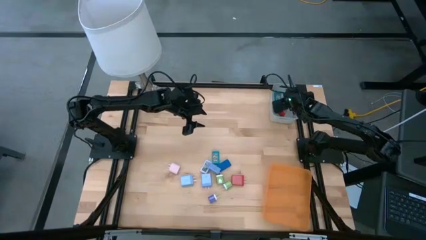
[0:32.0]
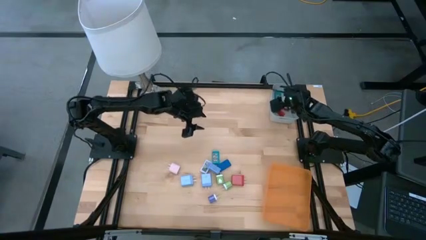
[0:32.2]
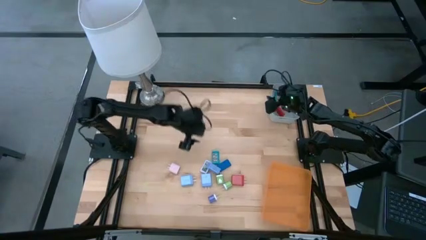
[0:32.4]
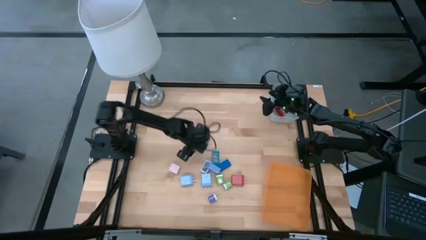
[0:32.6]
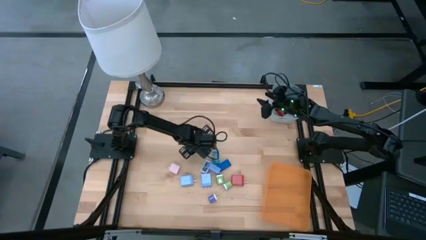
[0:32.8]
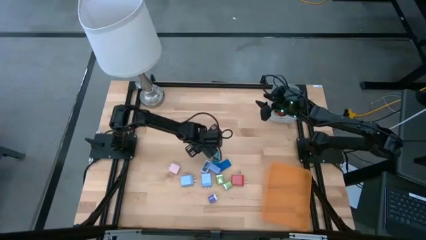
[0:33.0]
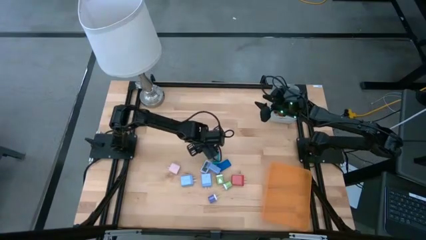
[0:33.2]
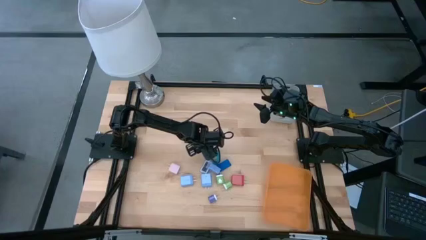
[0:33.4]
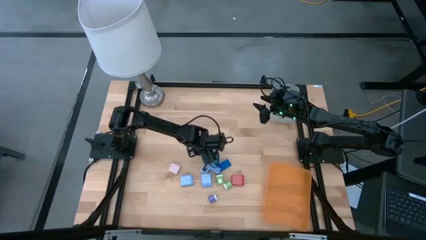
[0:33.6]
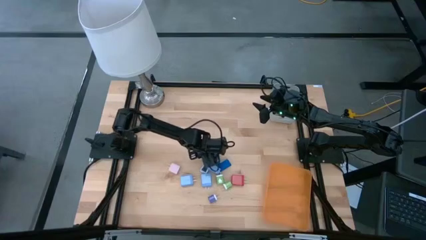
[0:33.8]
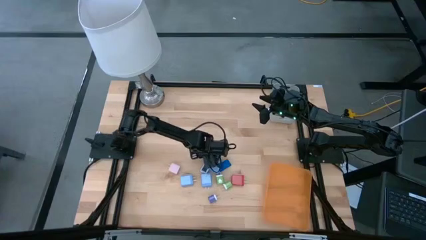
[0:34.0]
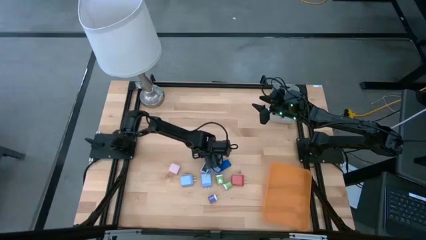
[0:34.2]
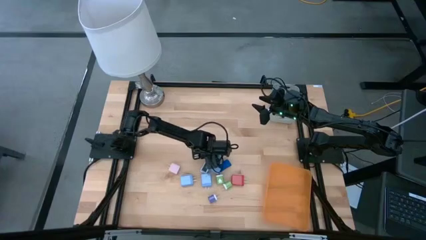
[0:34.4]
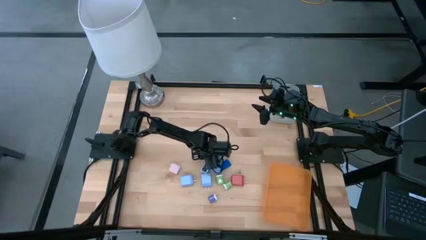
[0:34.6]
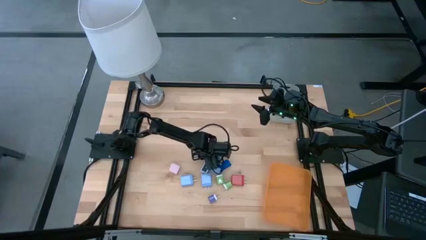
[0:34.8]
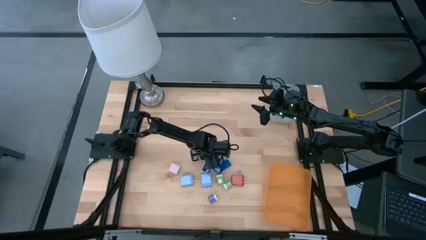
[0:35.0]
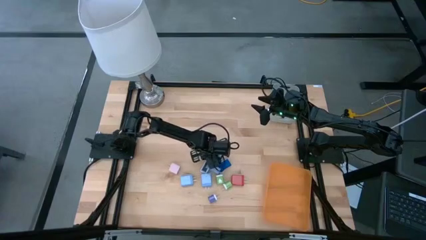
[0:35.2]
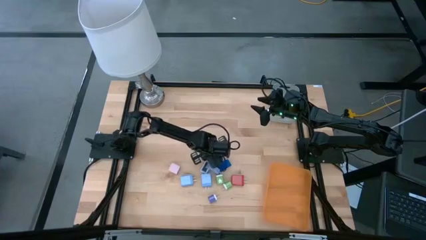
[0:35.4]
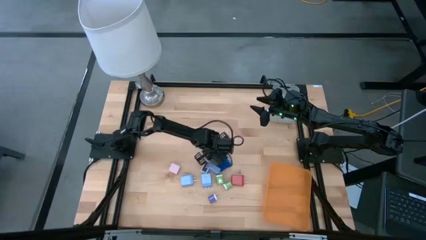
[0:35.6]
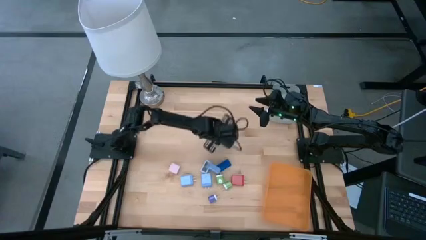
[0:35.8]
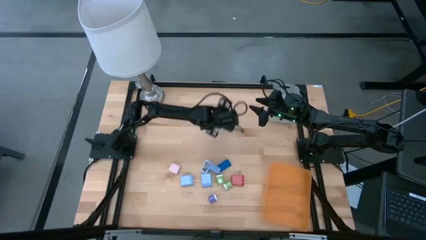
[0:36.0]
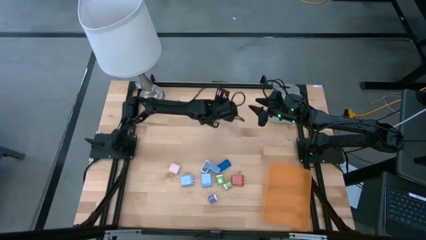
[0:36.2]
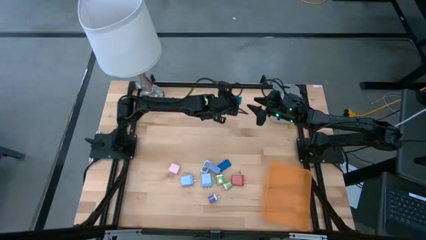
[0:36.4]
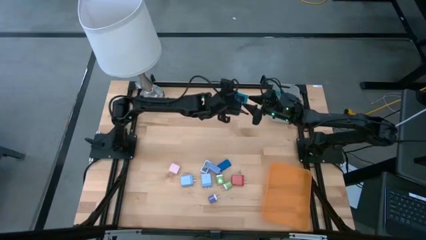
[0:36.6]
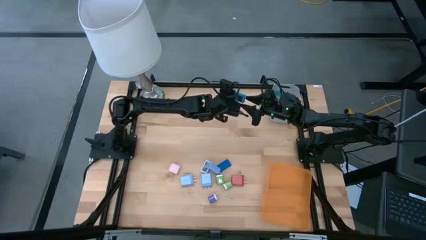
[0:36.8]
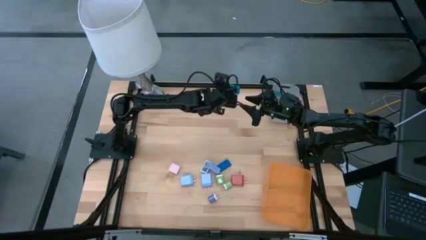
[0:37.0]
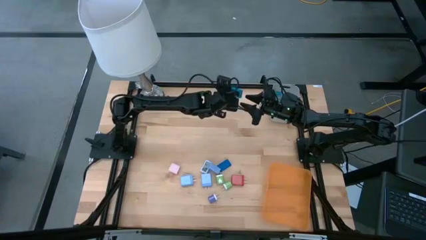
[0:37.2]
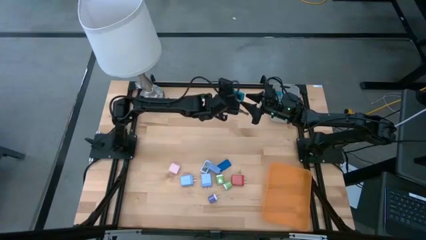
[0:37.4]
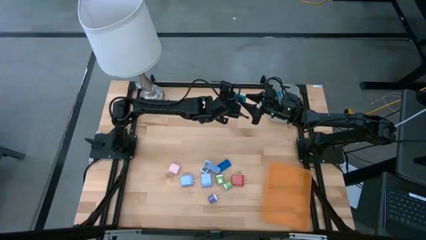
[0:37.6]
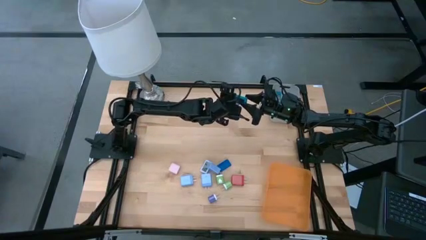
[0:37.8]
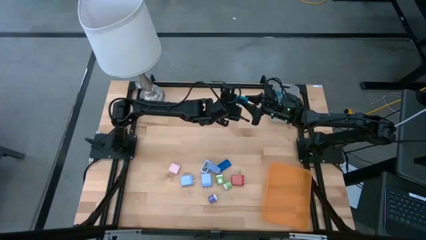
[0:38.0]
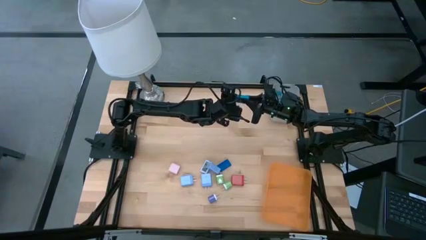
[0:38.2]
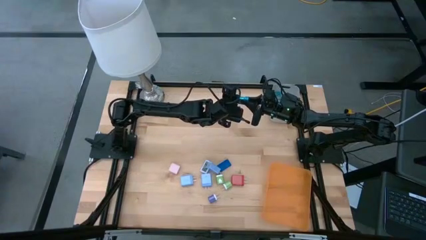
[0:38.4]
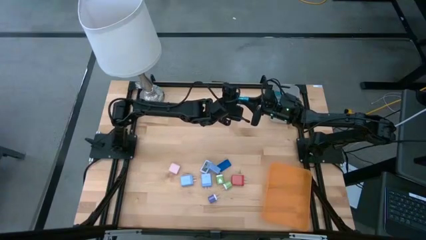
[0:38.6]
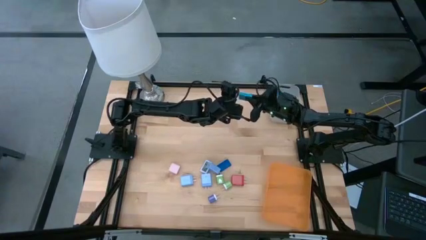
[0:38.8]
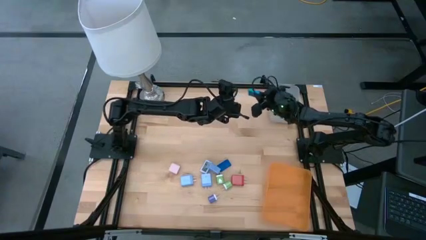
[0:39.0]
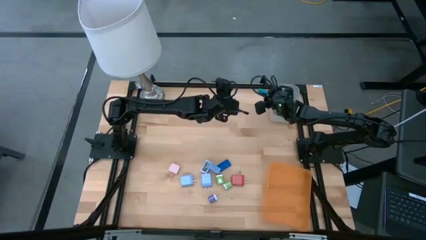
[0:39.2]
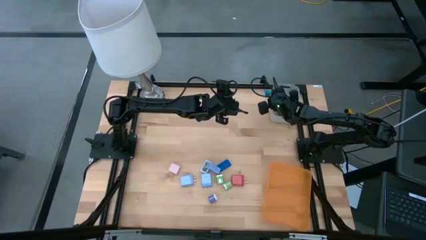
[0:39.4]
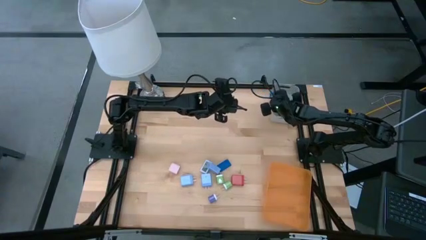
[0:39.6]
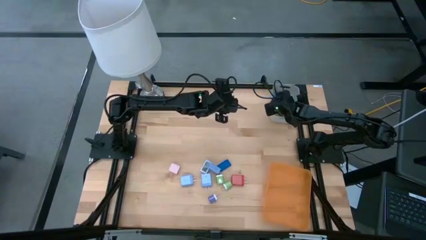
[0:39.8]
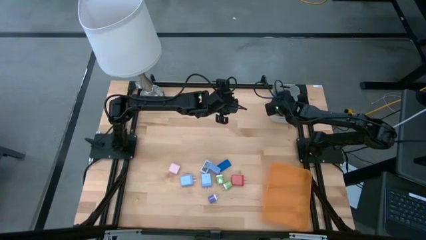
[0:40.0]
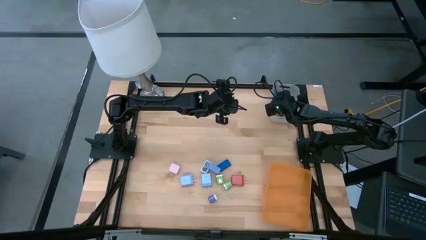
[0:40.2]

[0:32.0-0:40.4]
Task: Pick & Place Office items
Put the light blue digital clock into the gray bin

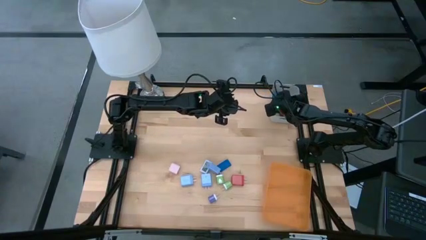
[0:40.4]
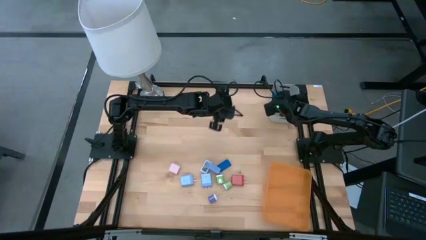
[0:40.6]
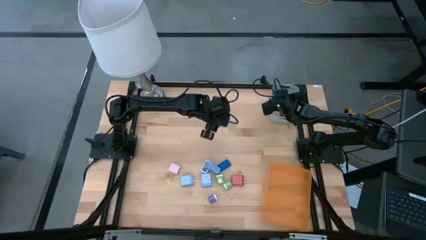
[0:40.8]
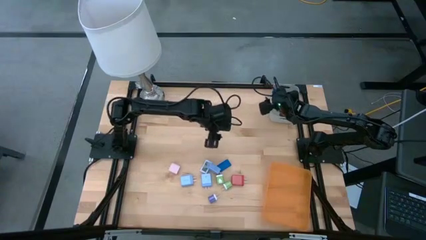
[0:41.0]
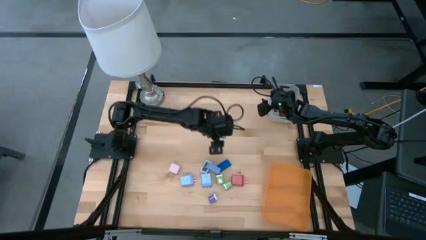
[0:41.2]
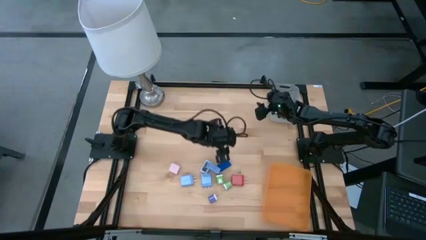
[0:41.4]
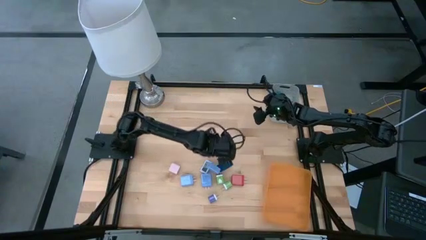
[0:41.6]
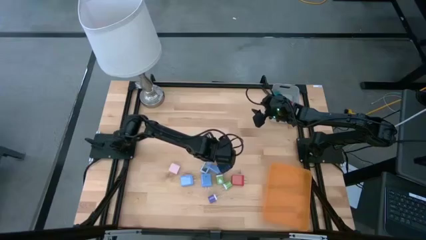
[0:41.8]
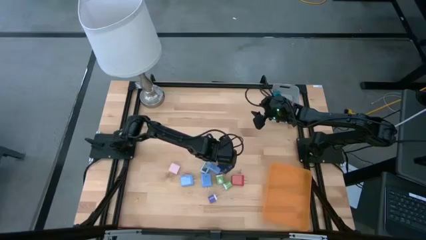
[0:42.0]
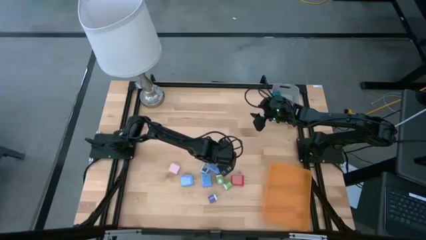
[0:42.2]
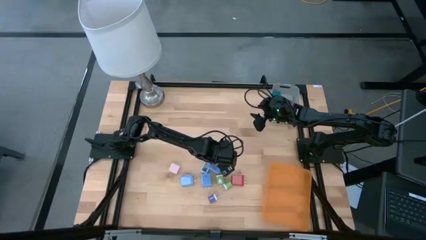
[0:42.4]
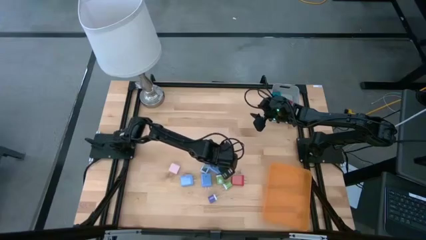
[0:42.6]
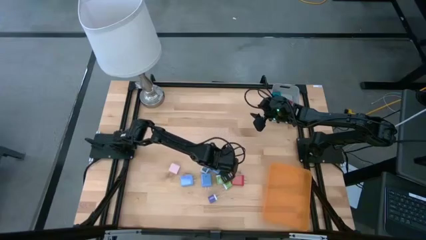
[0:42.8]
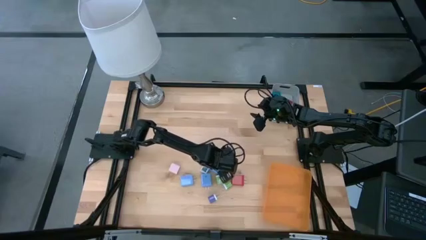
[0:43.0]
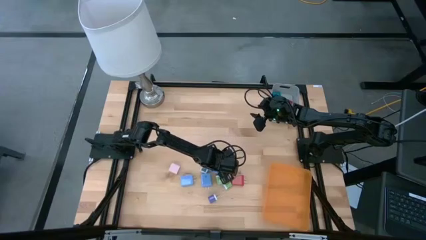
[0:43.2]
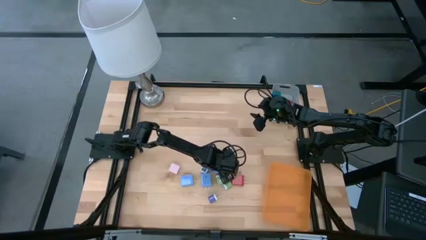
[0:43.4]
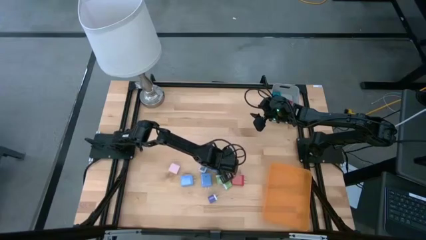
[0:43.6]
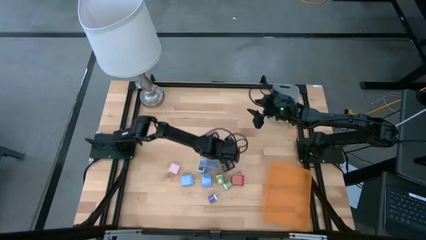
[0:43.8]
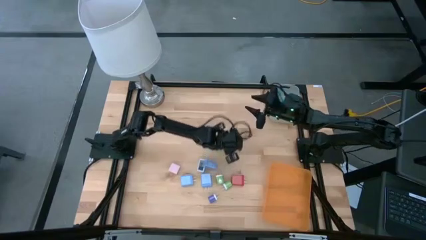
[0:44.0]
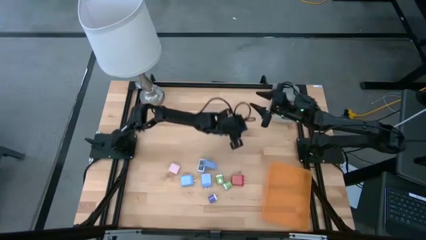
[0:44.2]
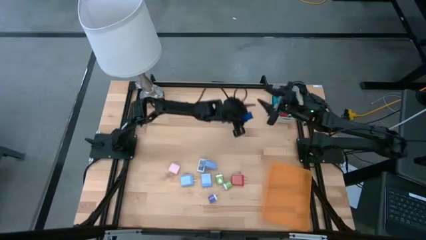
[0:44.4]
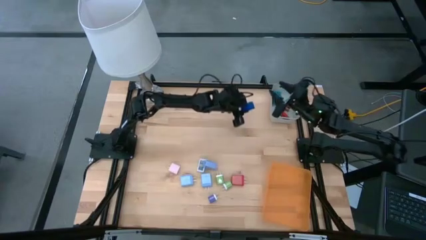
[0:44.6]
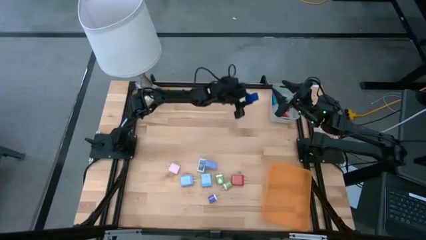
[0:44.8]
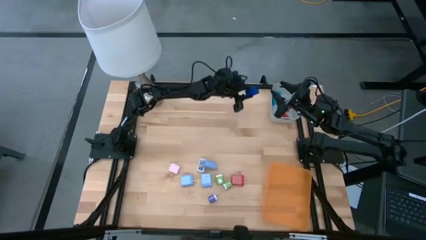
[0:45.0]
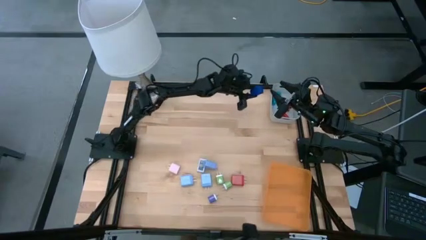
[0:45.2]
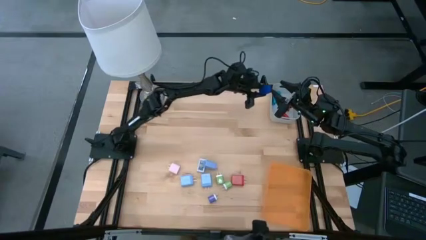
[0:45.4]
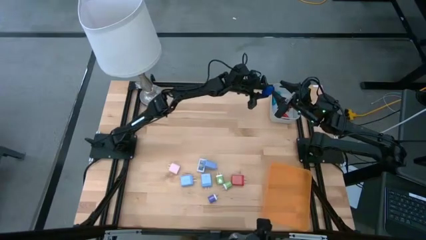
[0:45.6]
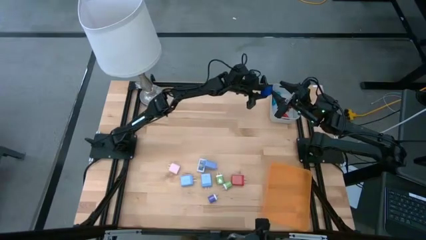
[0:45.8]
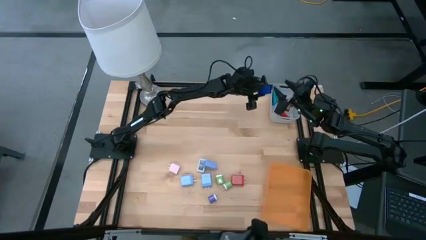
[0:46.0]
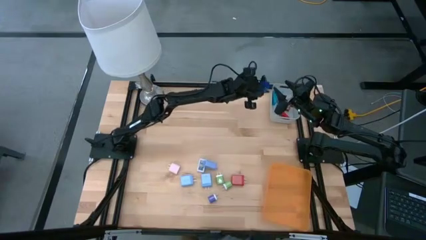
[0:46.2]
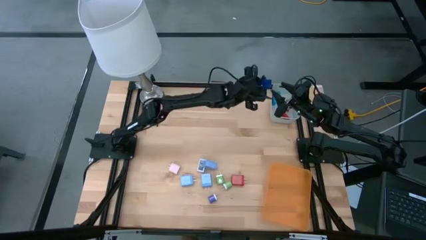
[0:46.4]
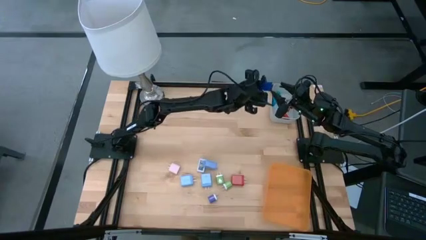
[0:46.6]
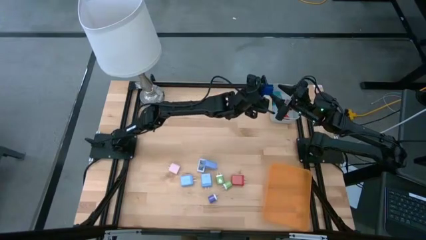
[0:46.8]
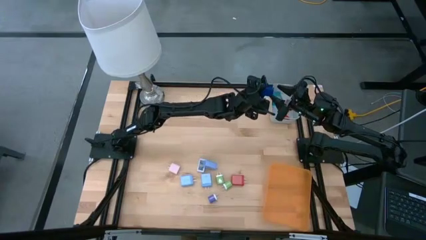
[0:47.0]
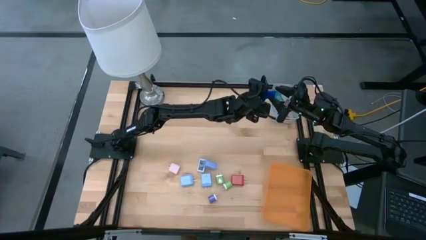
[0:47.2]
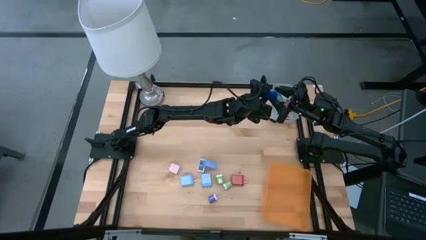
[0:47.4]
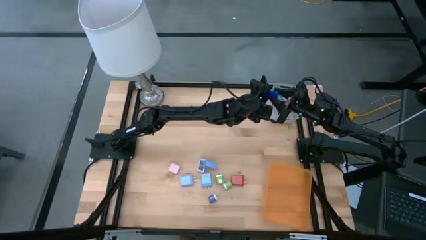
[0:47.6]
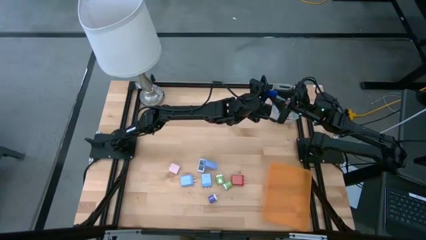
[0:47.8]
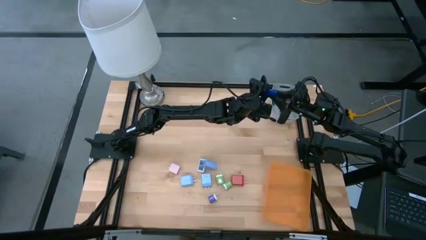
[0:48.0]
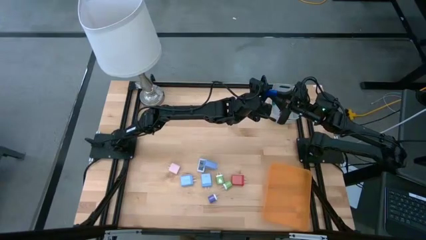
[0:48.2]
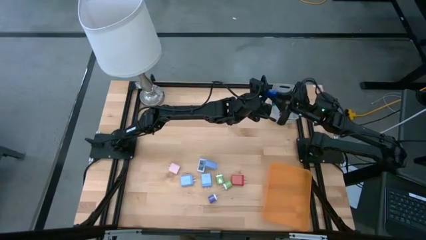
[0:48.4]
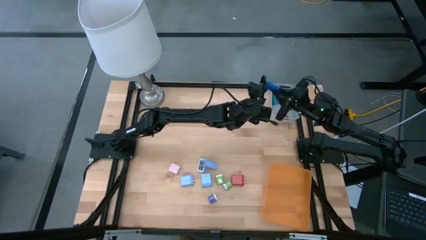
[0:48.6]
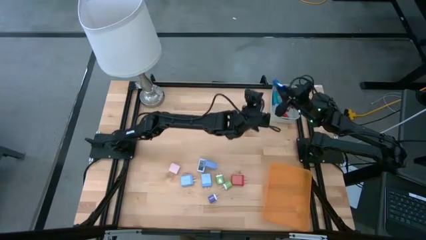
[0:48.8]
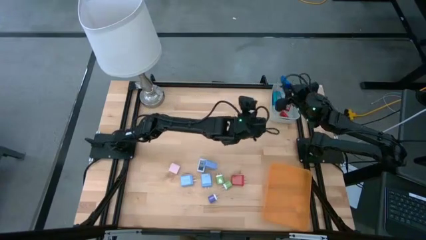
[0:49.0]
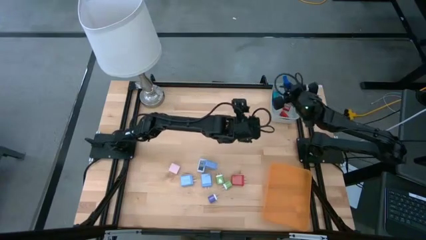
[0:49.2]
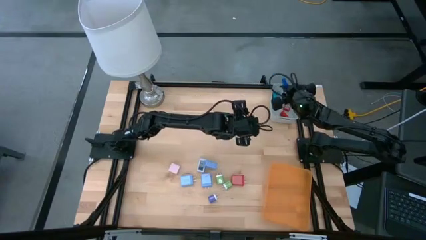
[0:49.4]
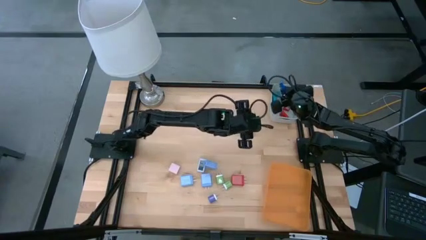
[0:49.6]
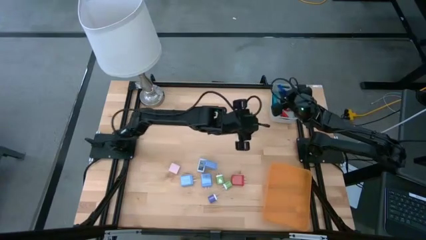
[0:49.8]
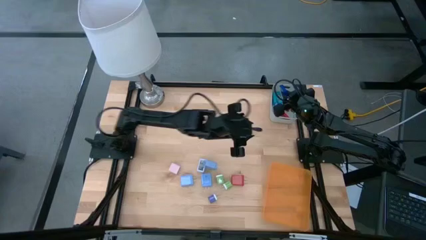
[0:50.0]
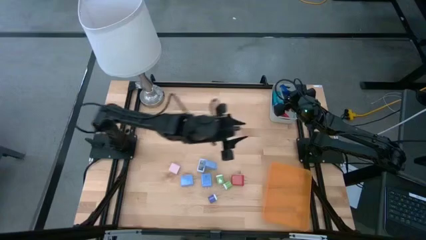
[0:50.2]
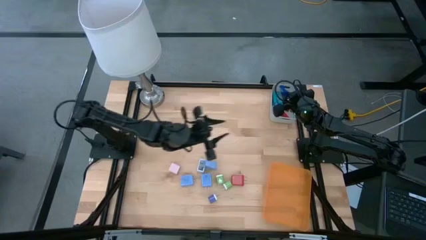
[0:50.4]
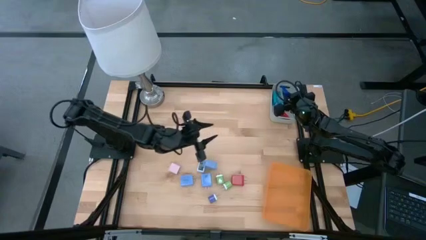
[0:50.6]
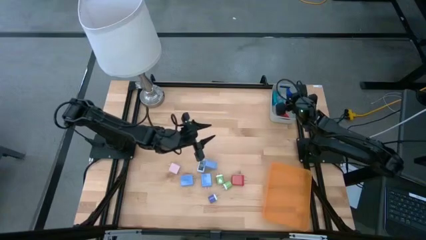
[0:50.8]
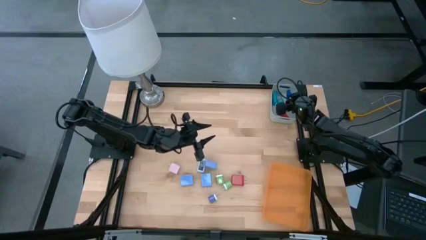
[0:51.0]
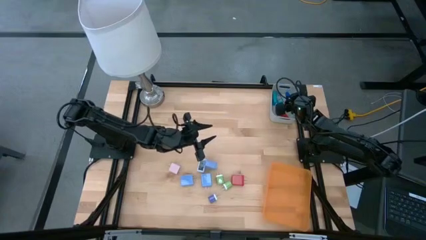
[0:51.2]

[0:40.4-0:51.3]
Put the blue digital clock into the gray bin
